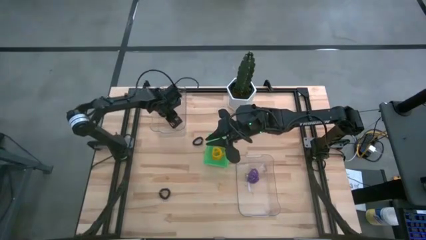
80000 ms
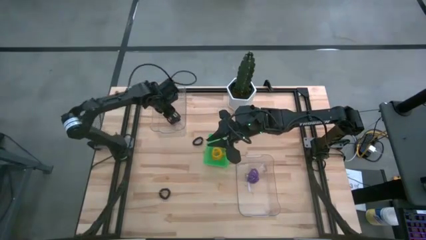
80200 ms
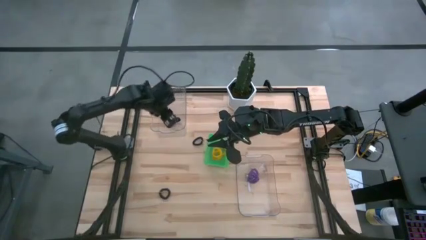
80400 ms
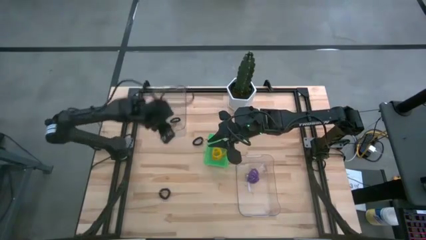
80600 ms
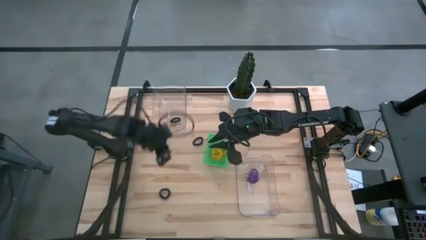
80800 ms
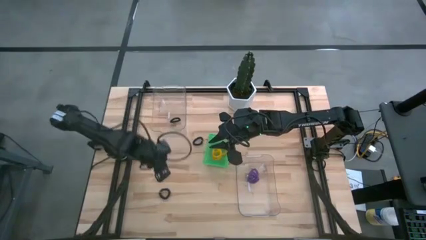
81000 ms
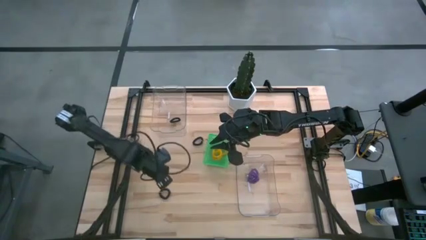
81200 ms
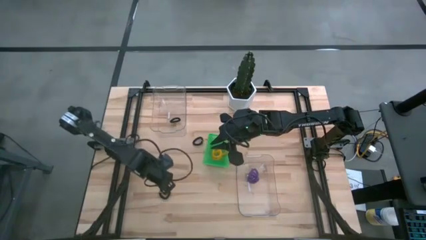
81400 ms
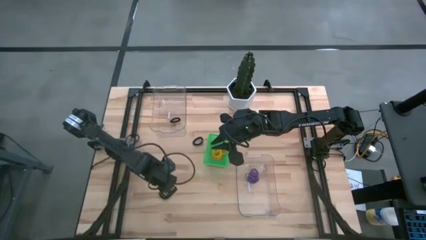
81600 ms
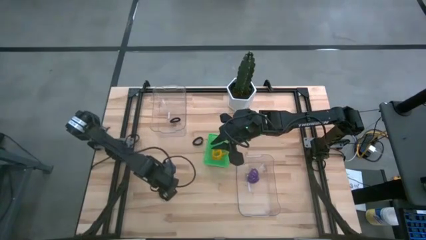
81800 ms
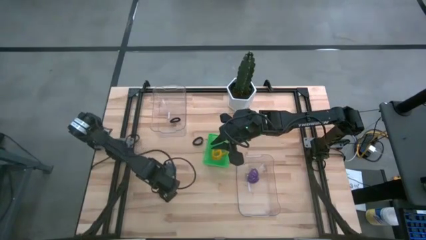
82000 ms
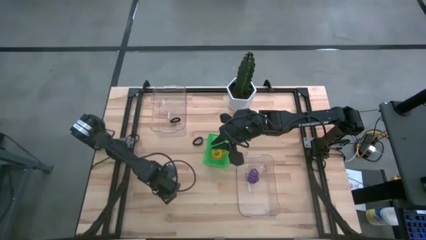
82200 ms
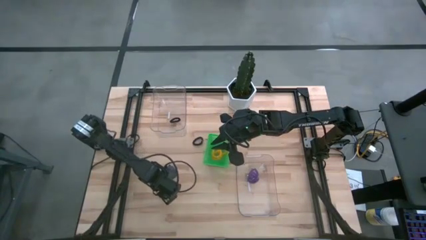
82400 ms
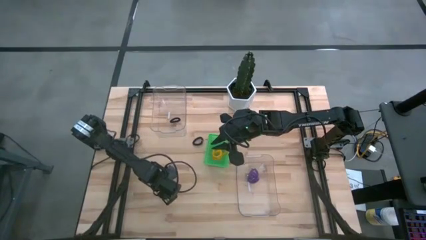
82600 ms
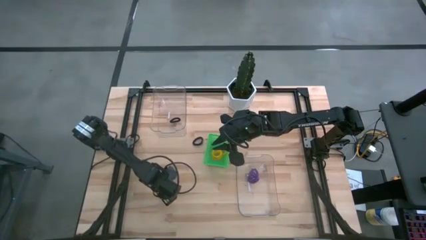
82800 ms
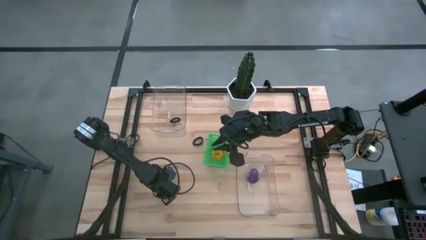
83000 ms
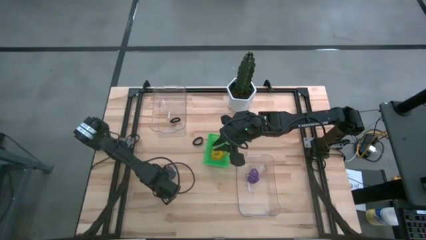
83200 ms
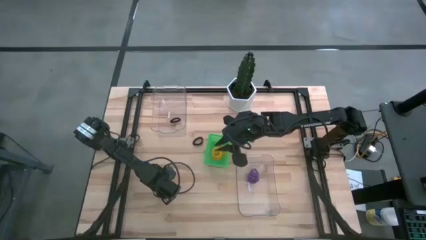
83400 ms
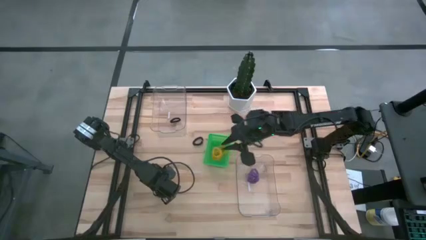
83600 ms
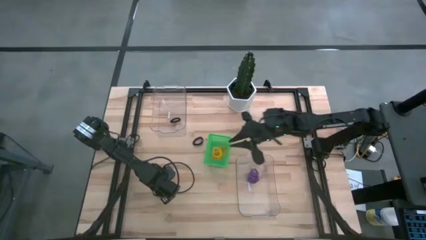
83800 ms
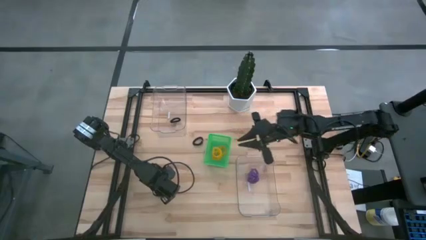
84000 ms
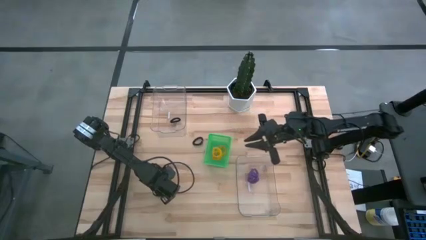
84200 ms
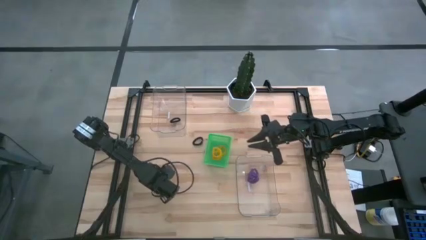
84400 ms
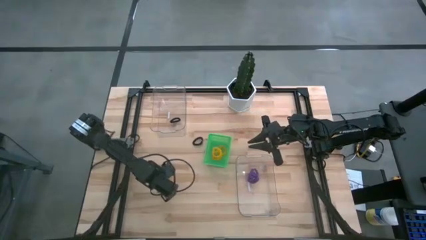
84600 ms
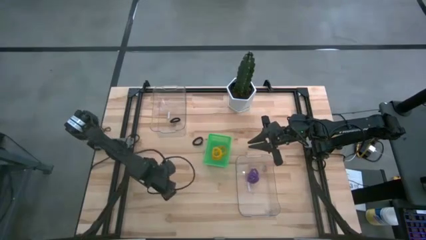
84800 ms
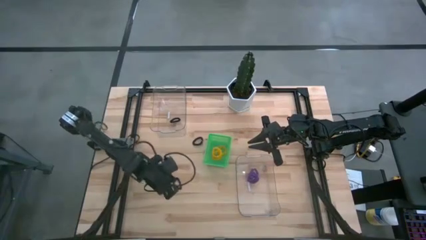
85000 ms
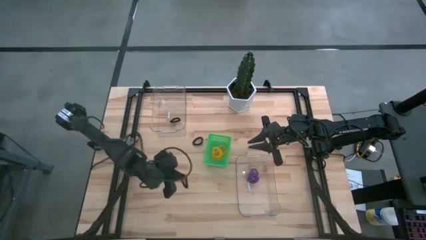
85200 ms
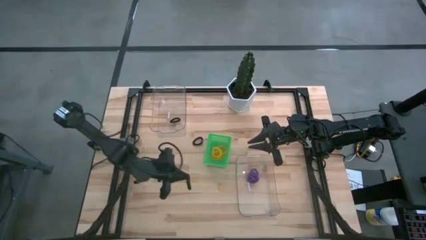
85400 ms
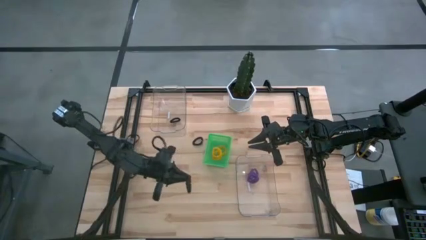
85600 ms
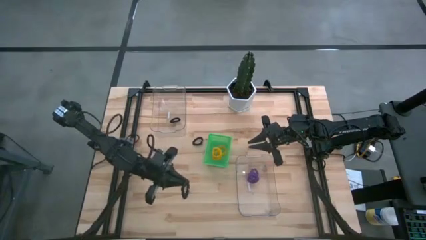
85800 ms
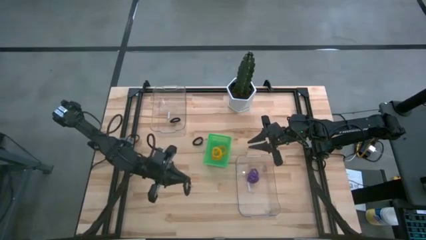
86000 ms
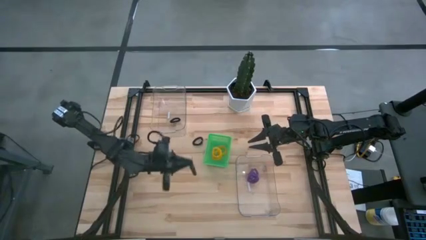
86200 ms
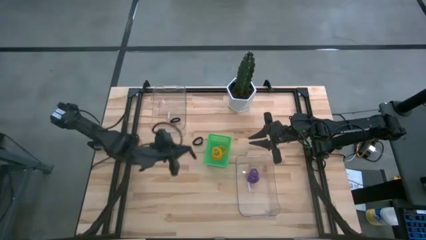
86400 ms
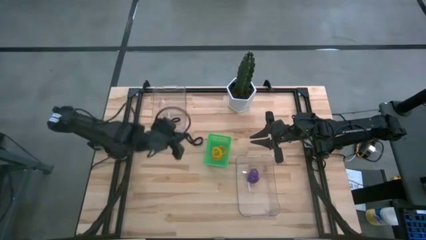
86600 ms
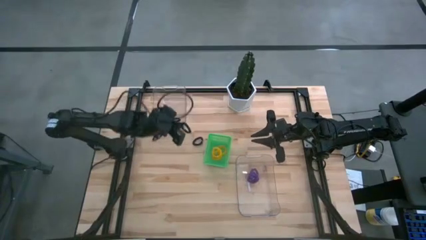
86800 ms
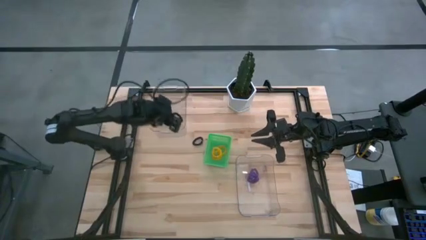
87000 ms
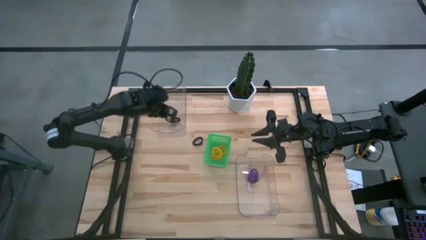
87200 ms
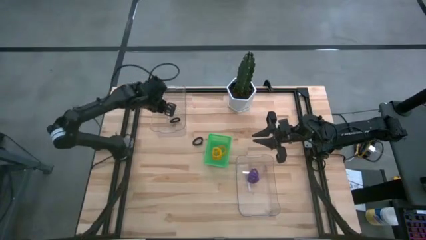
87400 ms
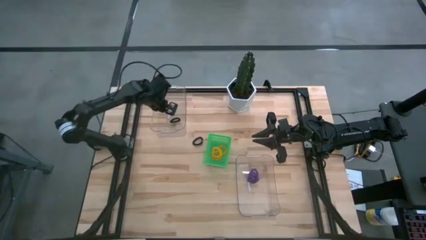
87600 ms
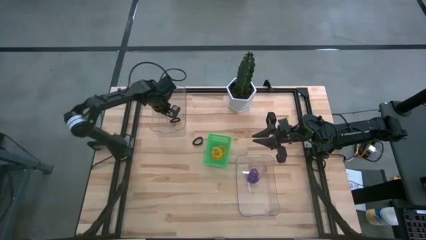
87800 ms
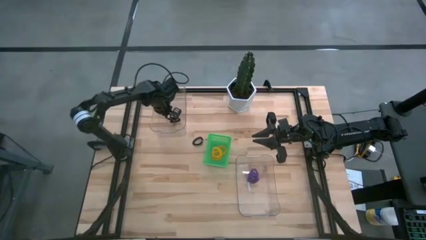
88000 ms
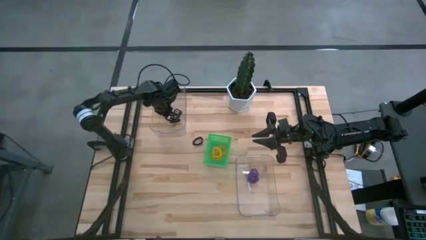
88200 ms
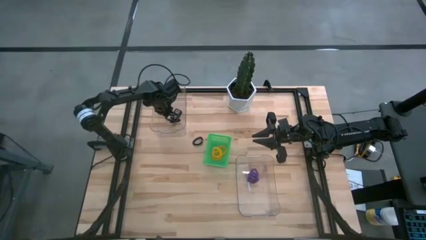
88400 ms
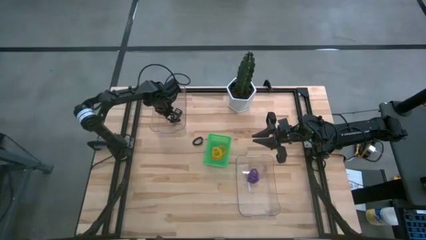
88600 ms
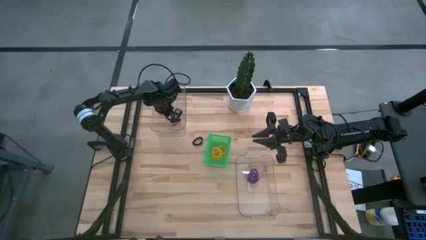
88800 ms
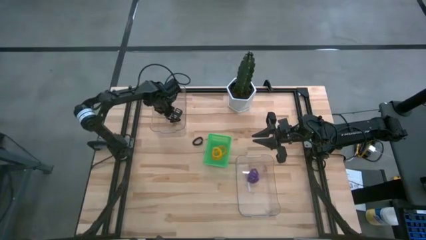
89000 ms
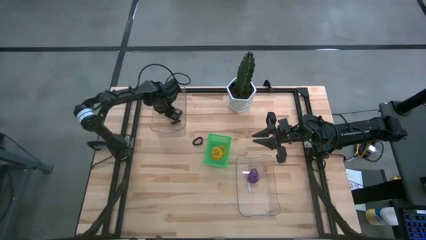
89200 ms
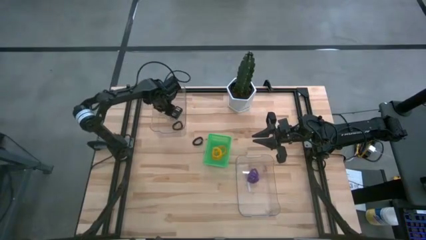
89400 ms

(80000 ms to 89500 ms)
Task: Sort spring keychains
Put the bottom black spring keychain into the left transparent bin

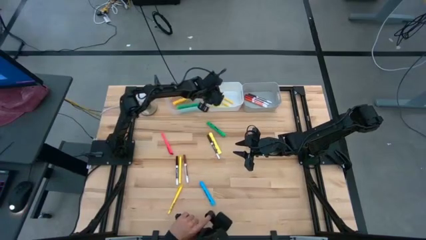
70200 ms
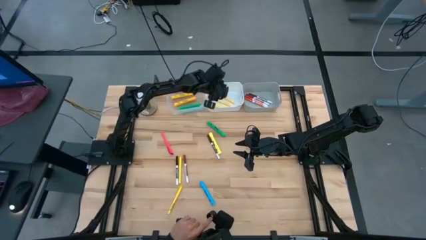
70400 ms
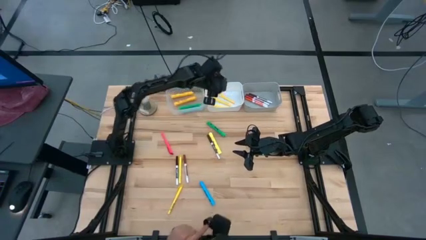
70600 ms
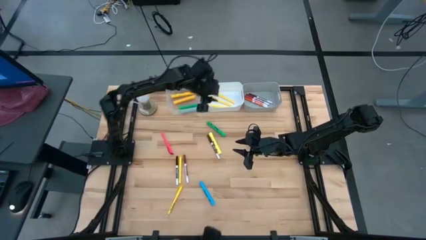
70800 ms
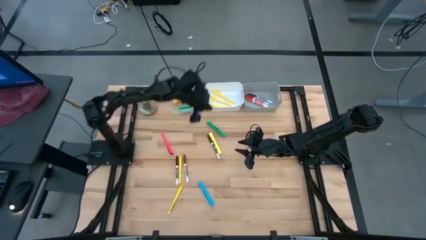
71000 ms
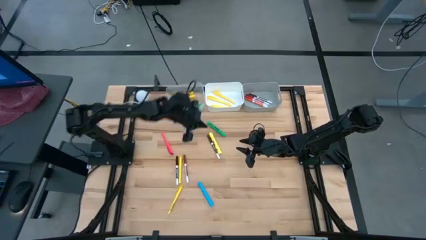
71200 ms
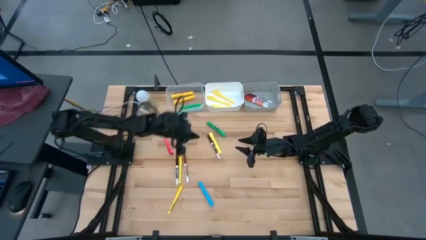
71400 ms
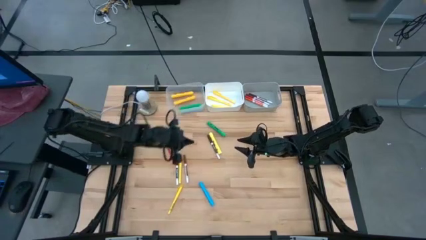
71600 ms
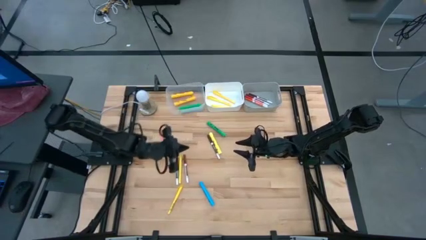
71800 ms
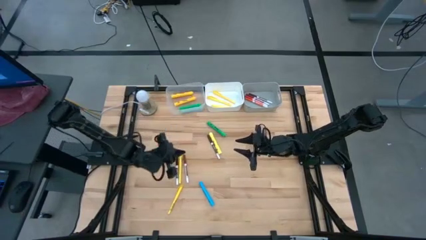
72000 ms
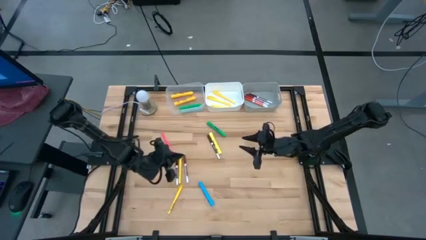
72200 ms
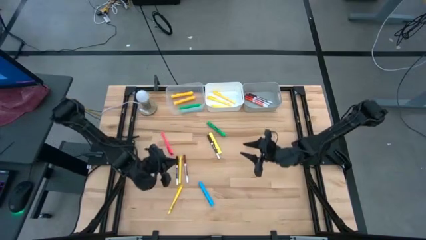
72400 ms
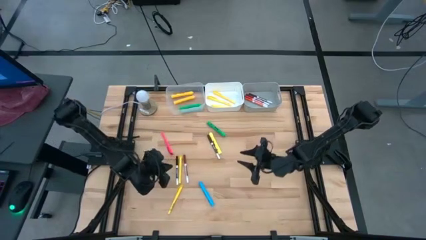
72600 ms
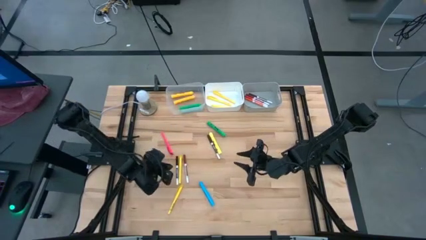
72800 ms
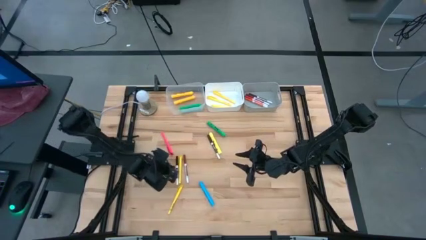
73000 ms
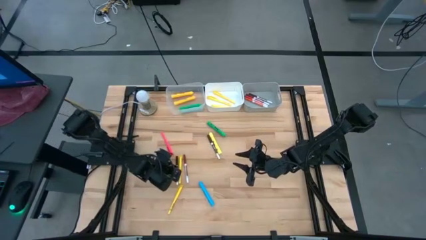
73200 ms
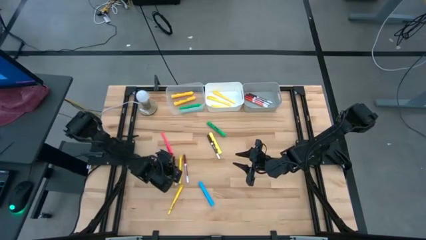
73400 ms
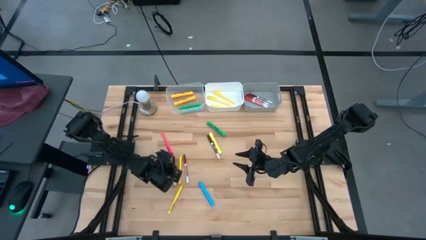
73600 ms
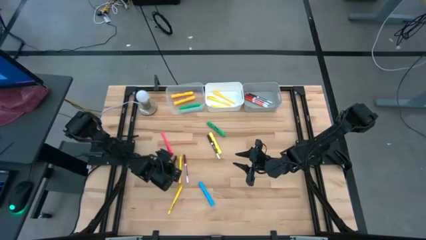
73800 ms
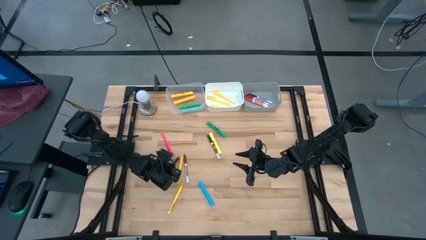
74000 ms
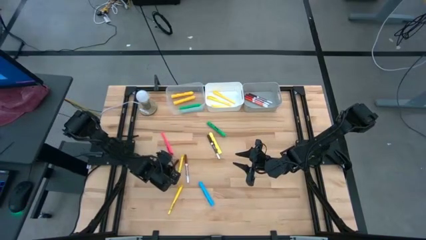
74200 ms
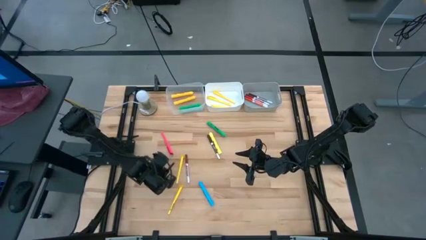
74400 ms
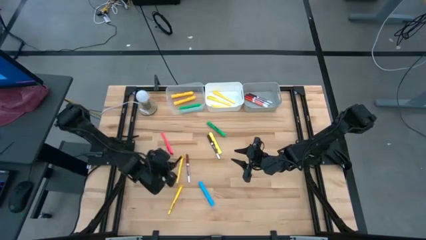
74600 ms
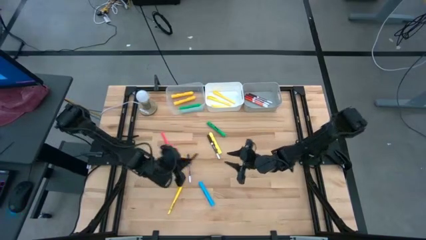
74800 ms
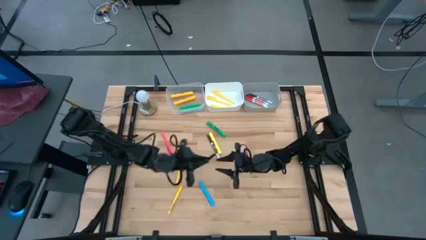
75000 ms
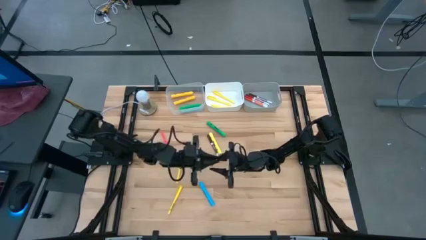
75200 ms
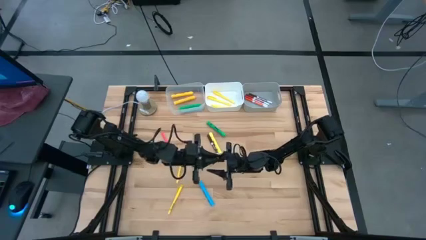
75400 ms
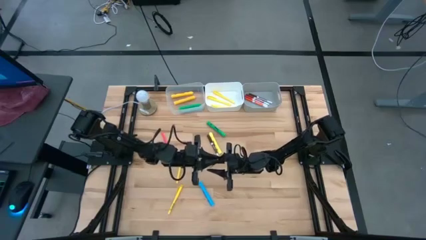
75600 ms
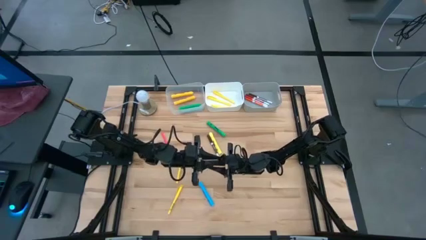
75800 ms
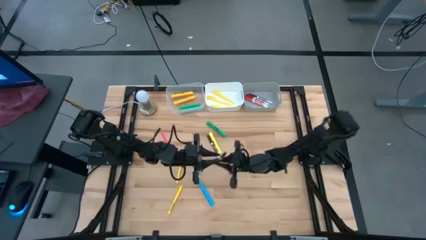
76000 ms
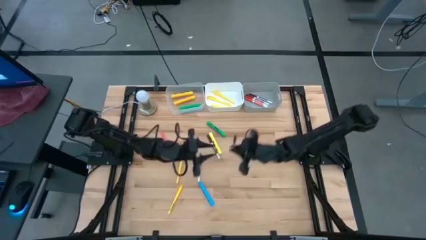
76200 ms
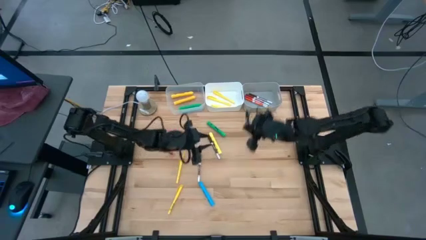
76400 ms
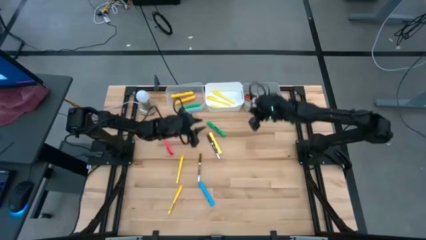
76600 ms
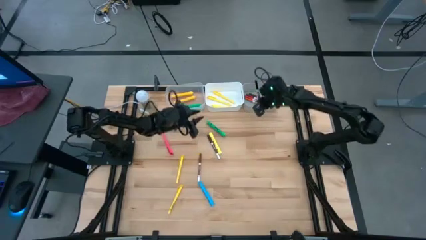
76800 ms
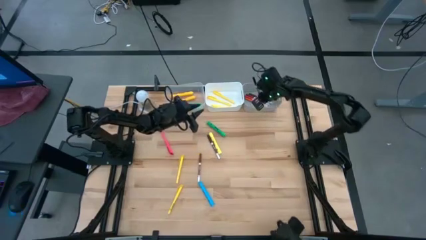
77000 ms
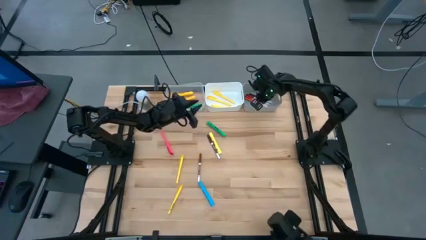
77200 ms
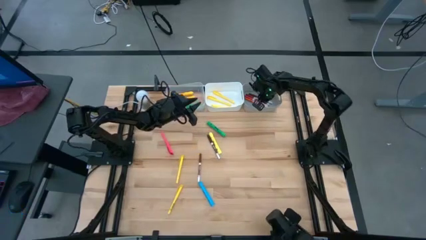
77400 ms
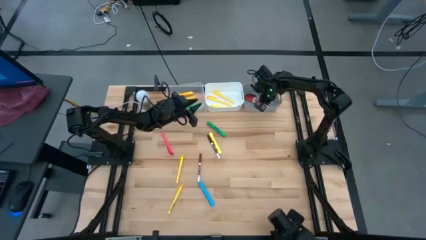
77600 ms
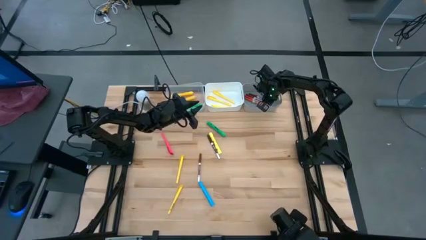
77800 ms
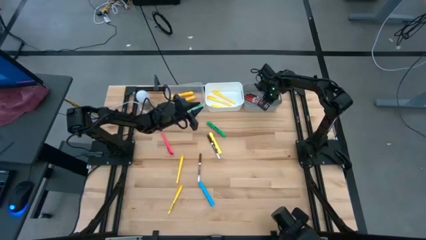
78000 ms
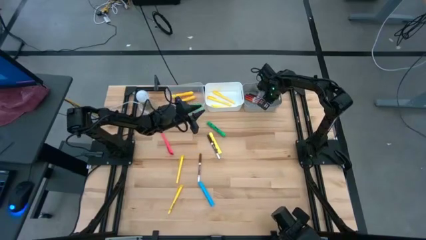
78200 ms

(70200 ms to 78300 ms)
Task: Pick & Place Markers
Put the black marker pen into the gray bin
